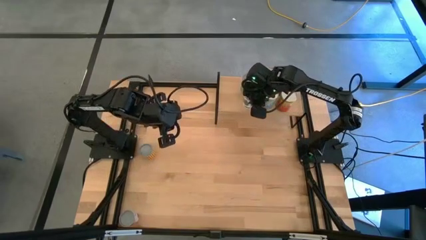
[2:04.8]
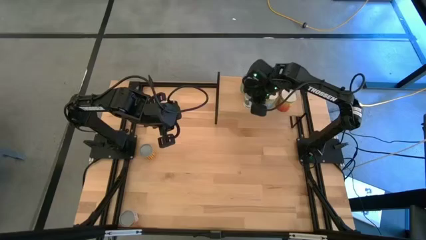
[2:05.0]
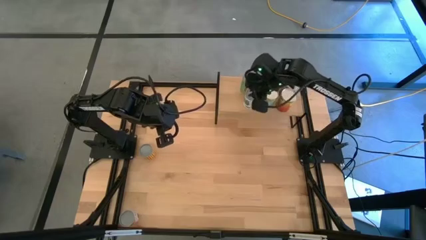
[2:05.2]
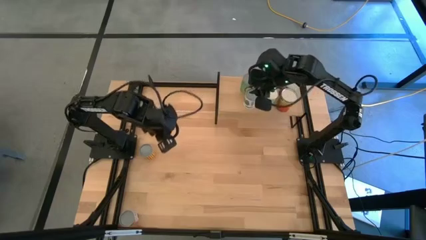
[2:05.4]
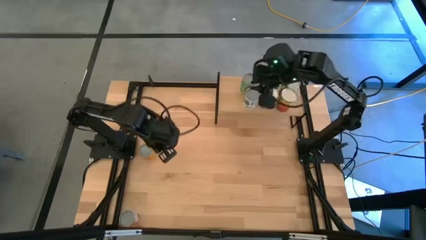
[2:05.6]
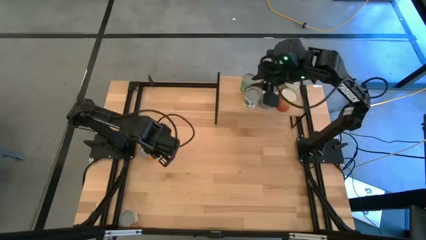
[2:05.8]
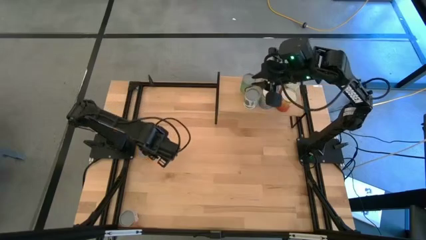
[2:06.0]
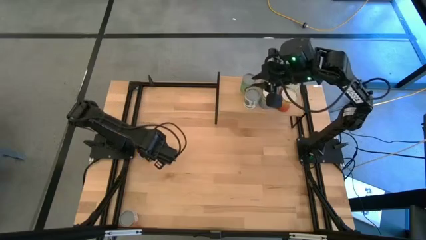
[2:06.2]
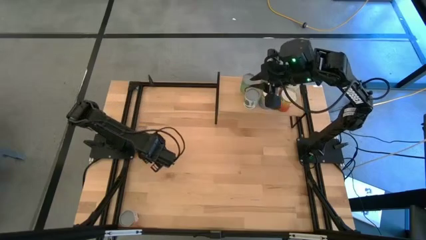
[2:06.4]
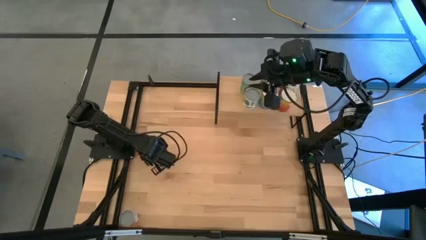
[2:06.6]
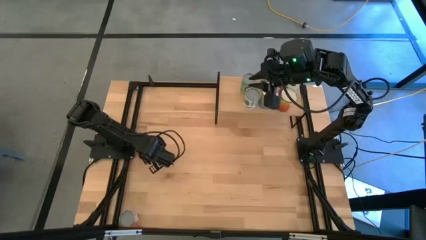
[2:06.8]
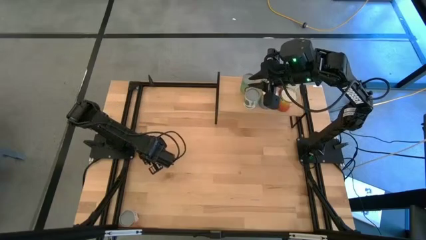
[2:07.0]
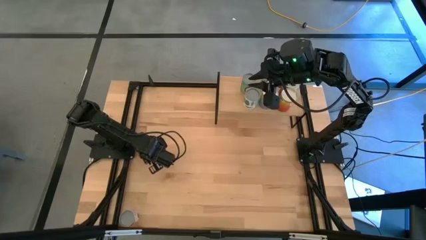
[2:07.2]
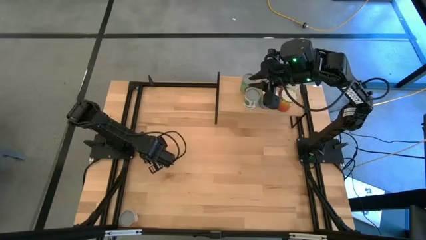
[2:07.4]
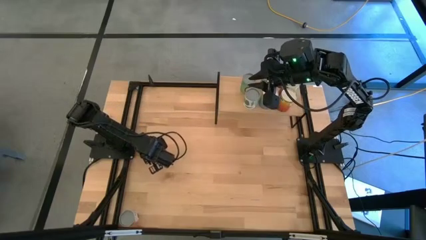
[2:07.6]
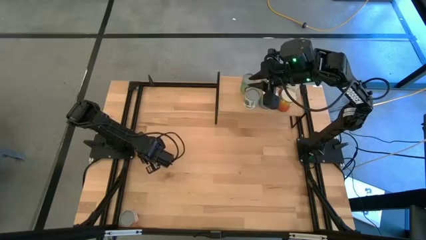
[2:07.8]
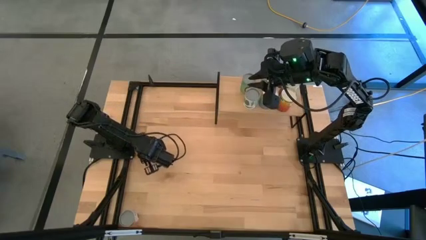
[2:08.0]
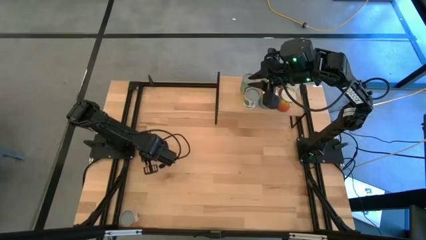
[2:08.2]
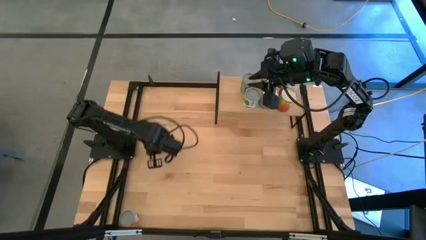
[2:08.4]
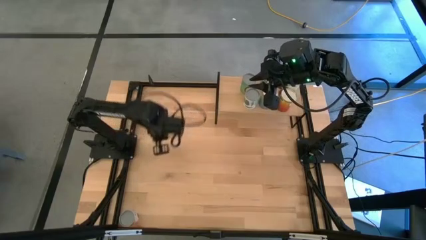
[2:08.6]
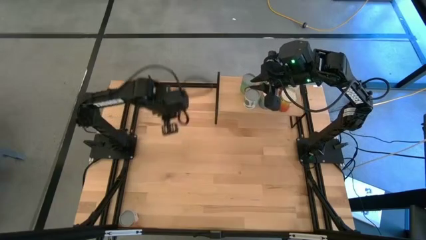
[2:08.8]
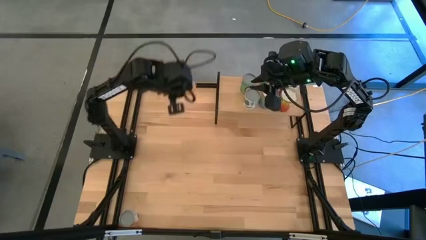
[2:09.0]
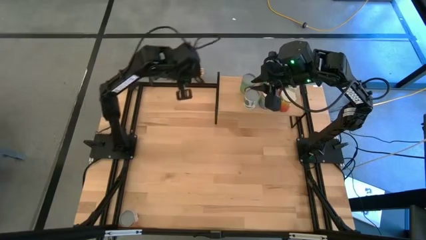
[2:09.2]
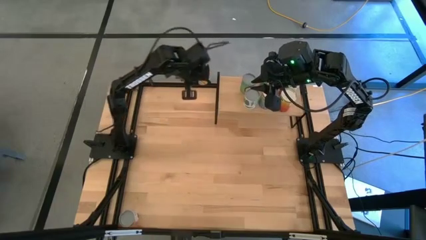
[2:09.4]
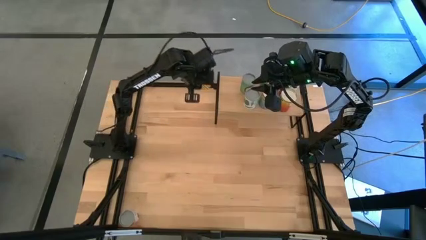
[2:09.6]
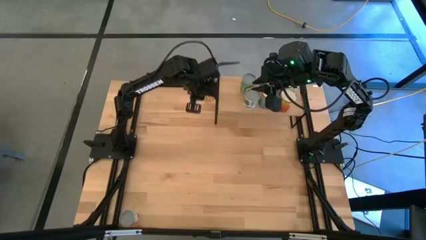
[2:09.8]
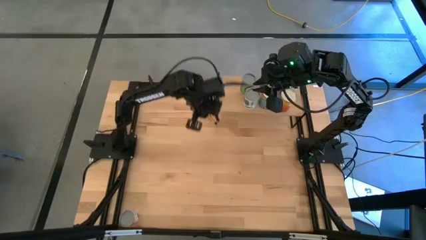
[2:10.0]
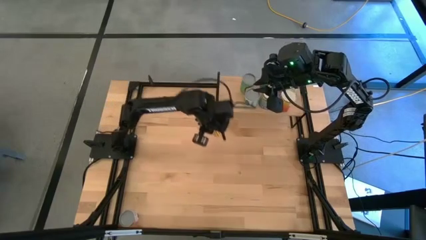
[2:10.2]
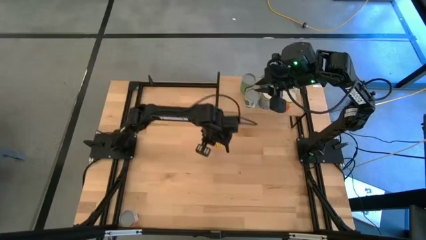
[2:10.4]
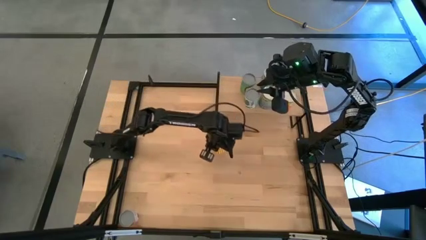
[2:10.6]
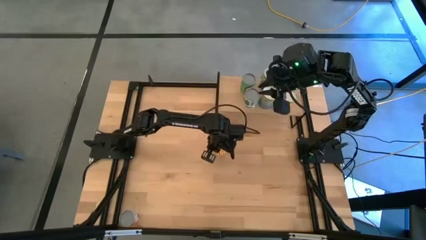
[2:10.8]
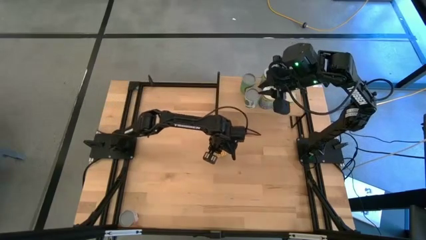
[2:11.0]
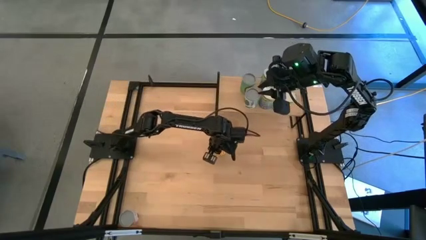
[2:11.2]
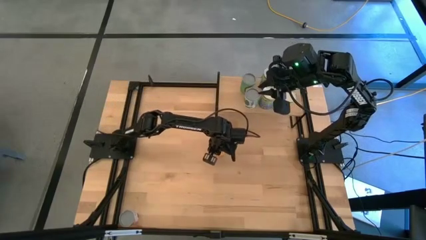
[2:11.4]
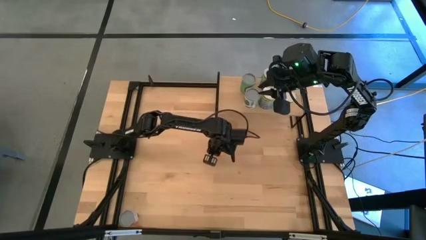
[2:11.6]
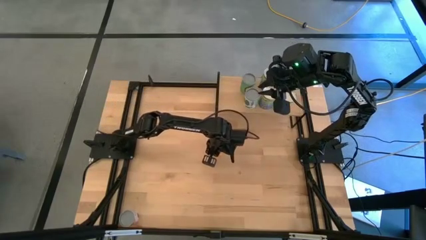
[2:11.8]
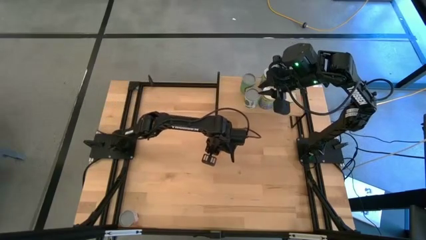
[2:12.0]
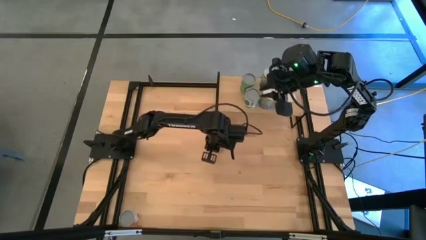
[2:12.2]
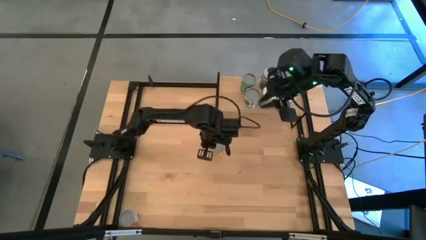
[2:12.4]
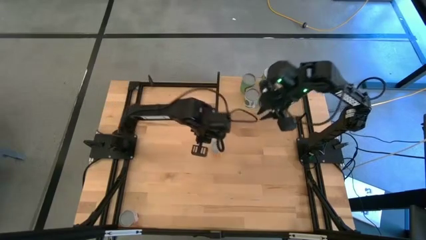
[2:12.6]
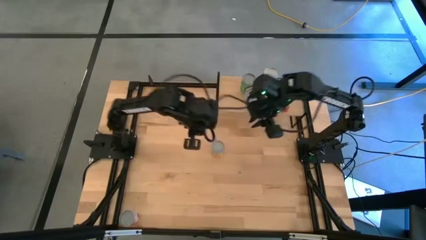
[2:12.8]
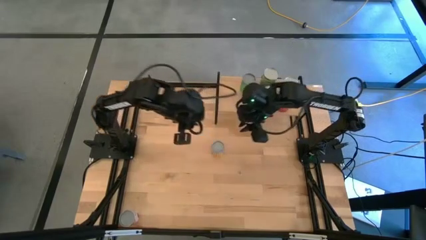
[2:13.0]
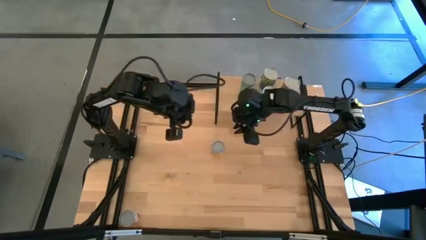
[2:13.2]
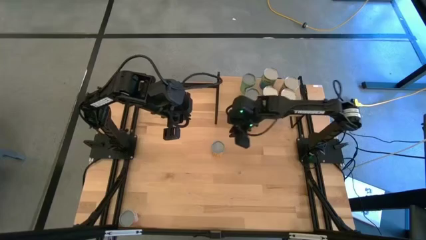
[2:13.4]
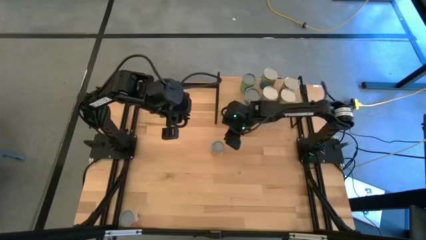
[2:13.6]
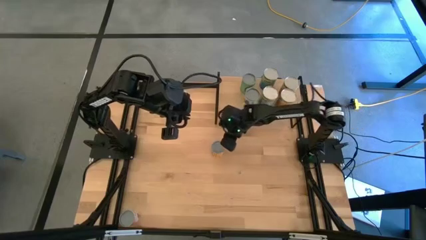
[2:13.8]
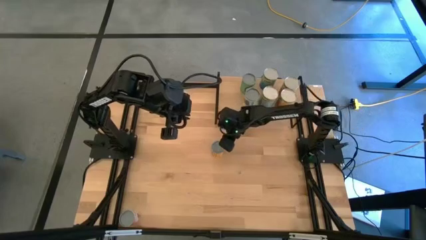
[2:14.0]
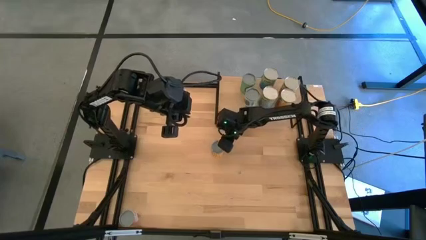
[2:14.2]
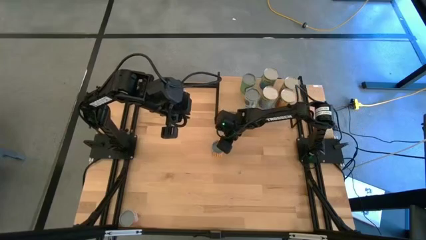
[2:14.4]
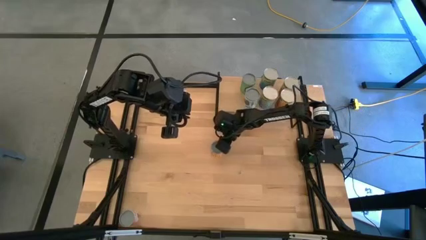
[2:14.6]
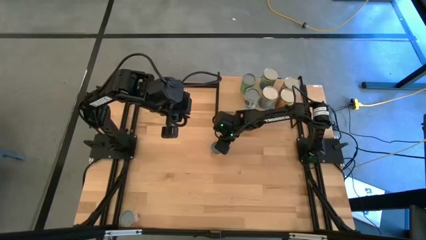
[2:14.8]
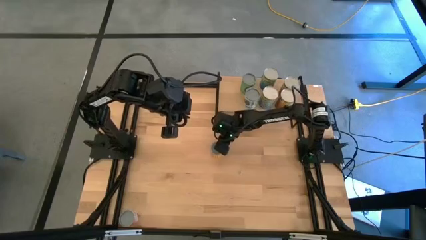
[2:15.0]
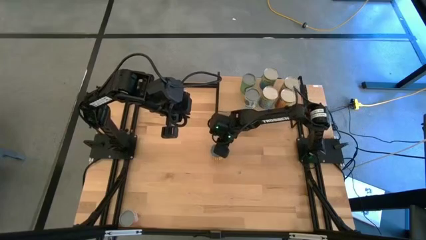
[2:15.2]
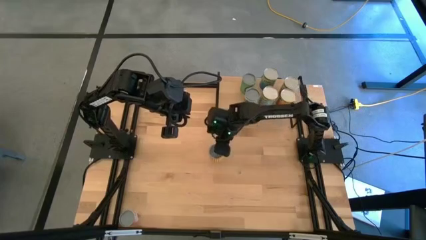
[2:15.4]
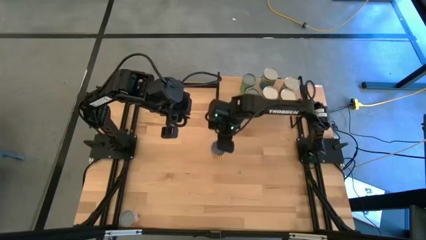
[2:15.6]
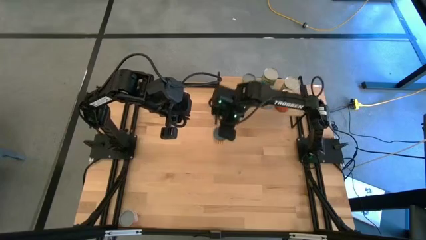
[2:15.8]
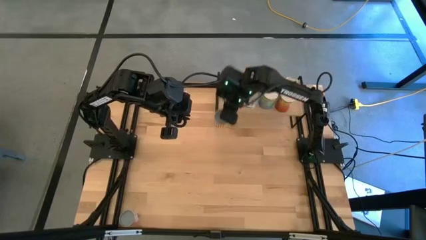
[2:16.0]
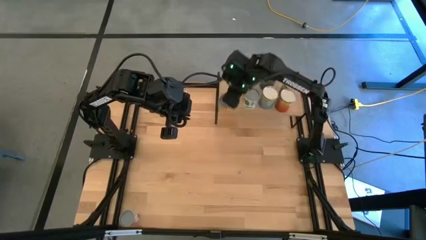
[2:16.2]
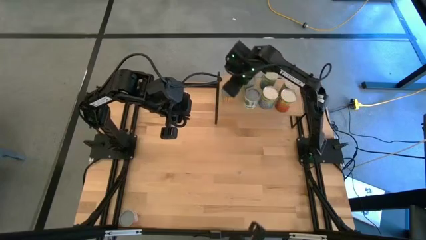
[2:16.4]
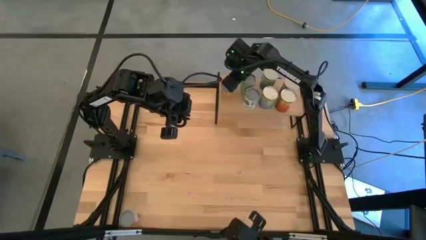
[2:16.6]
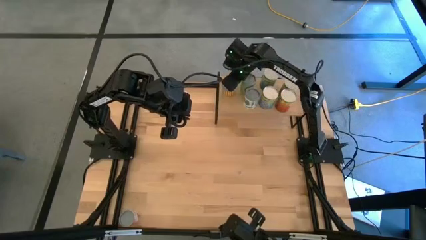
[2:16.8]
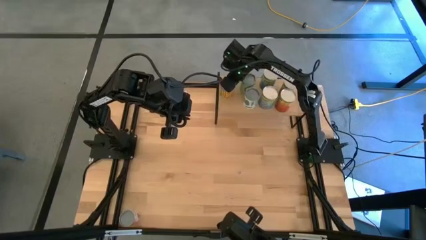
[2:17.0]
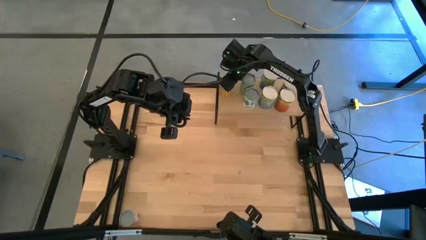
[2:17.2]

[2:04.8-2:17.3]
Task: Pick and place cans onto a shelf
Put the yellow canned good on the shelf
